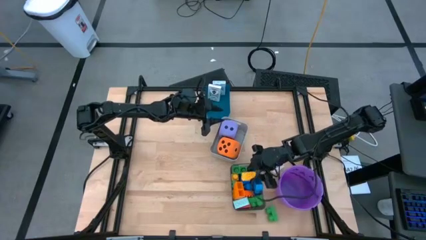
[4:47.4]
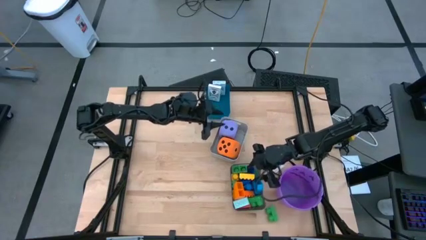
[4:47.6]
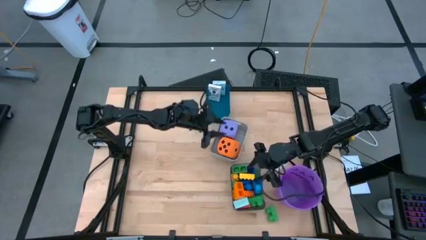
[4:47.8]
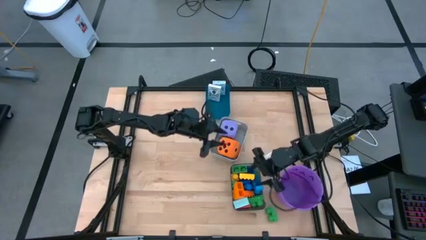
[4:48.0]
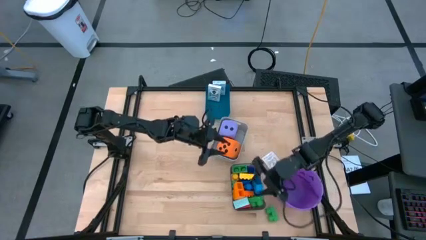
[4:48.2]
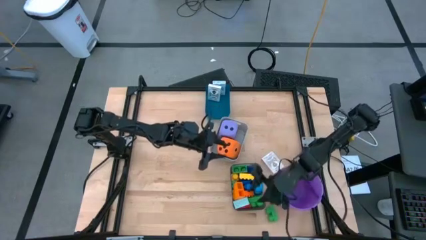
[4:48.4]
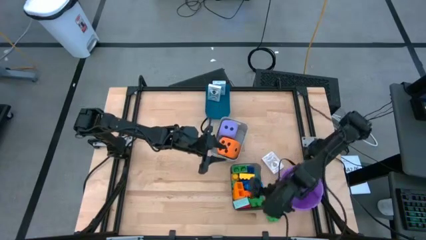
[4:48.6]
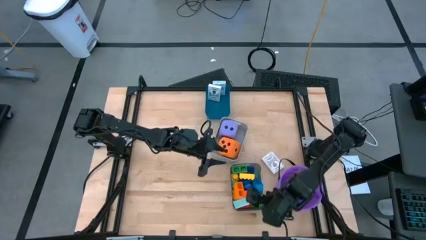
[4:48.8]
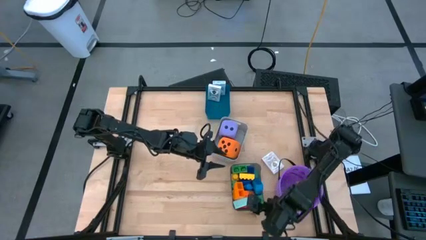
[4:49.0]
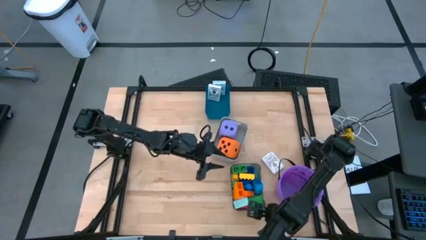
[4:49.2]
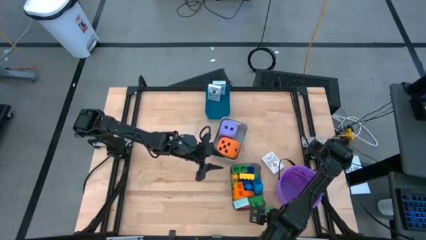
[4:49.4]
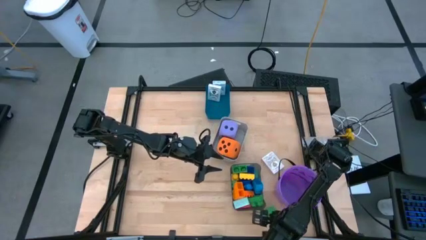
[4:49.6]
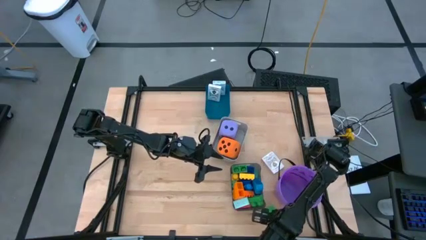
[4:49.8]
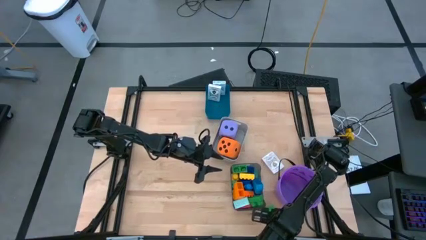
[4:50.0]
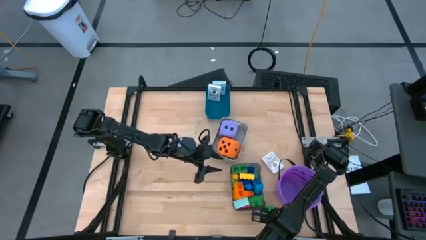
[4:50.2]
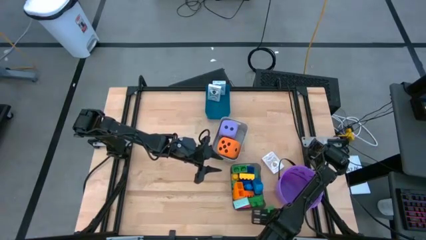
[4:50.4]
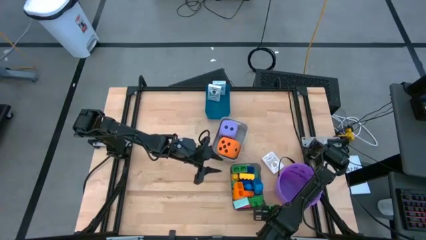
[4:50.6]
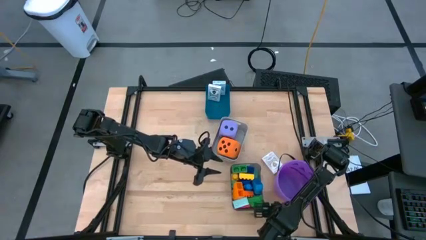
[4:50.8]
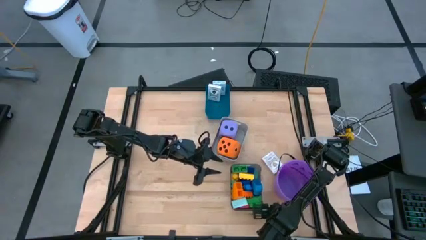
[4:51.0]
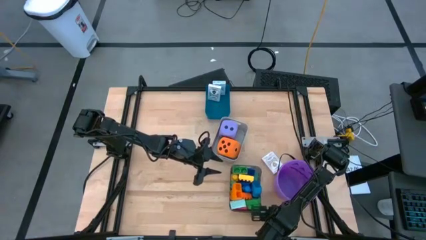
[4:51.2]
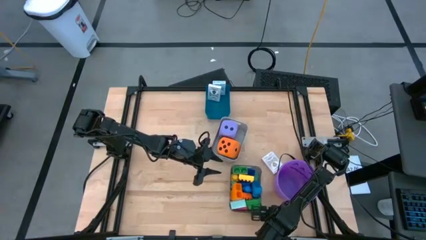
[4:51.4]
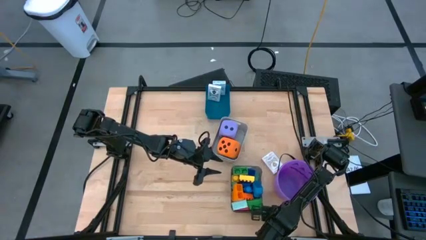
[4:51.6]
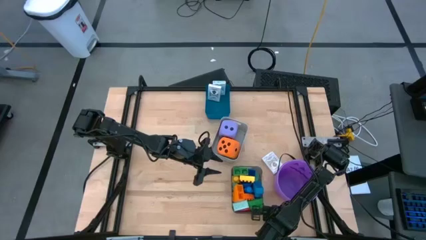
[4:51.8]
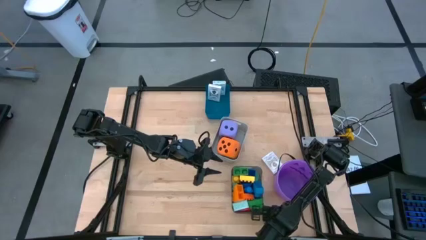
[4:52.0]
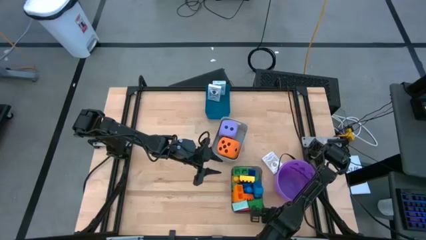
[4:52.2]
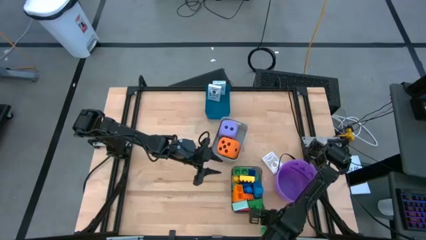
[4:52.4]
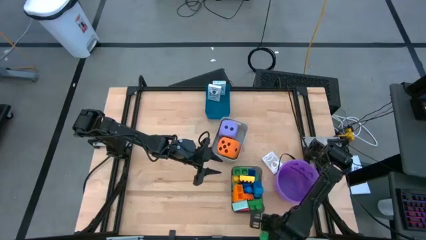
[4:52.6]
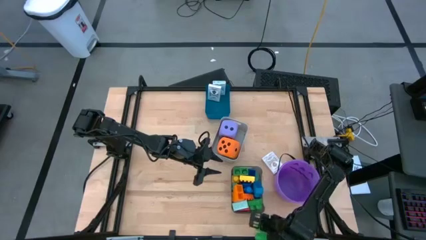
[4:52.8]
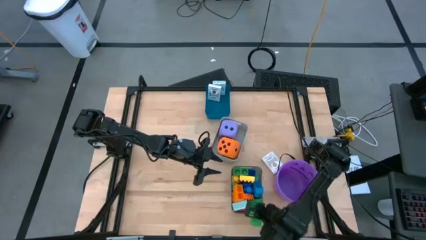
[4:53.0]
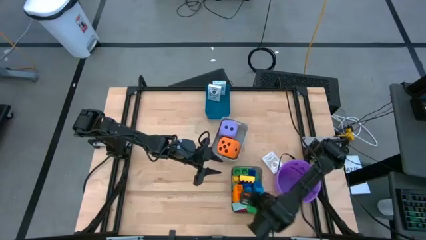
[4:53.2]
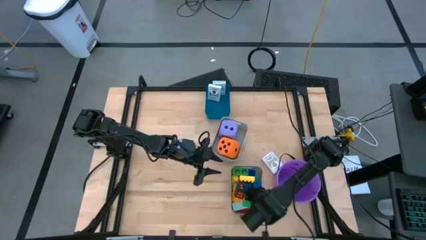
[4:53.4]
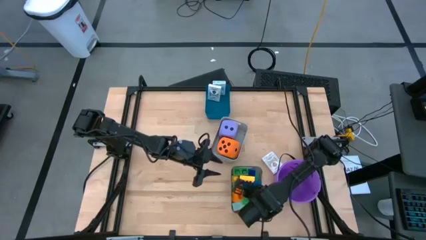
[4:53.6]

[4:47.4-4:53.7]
Task: Pick & Place Toys
Put the green game piece into the black bin

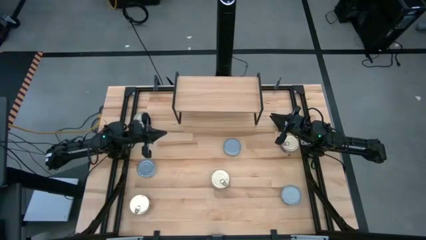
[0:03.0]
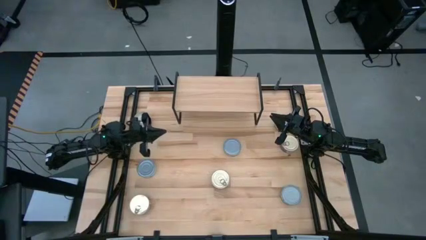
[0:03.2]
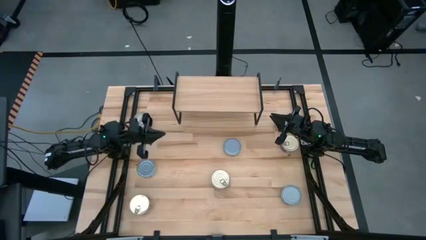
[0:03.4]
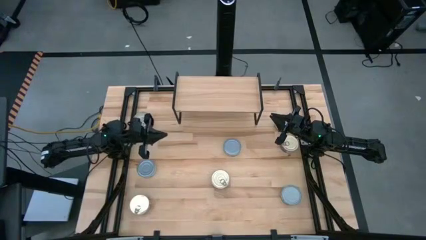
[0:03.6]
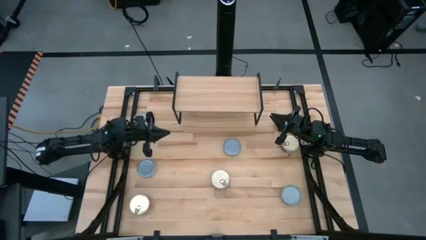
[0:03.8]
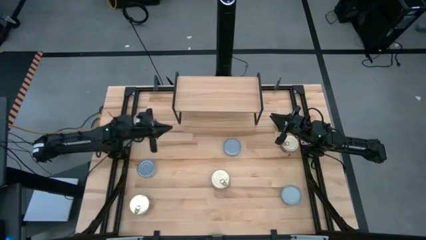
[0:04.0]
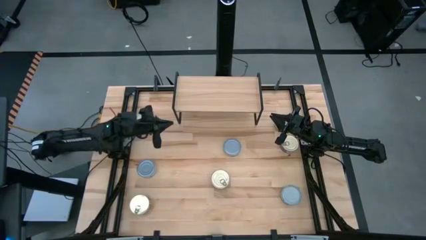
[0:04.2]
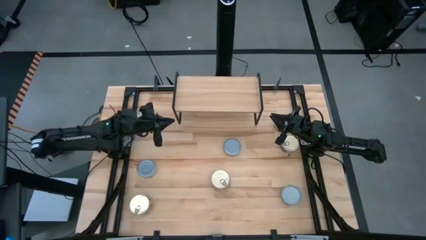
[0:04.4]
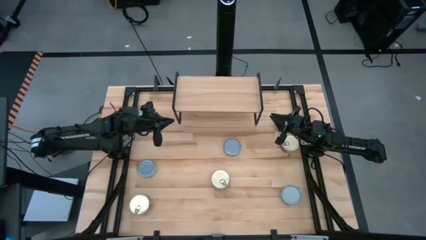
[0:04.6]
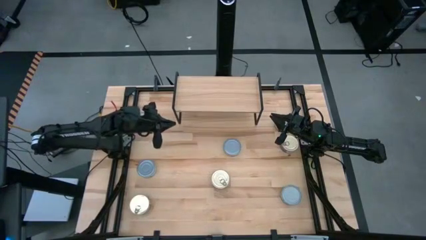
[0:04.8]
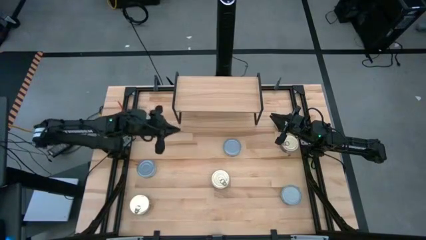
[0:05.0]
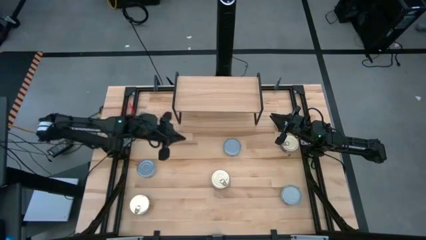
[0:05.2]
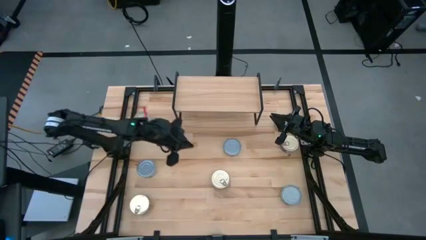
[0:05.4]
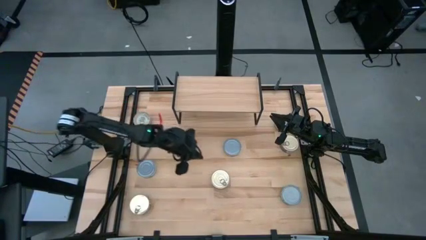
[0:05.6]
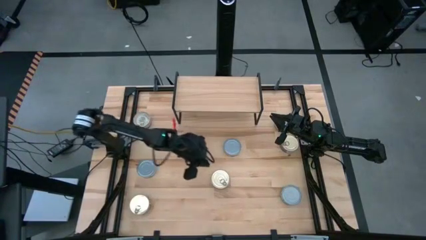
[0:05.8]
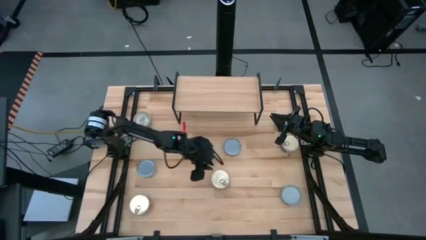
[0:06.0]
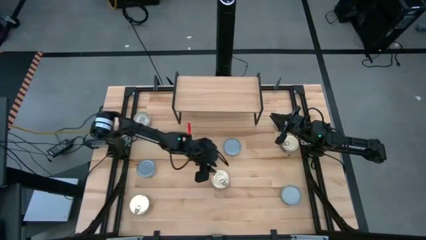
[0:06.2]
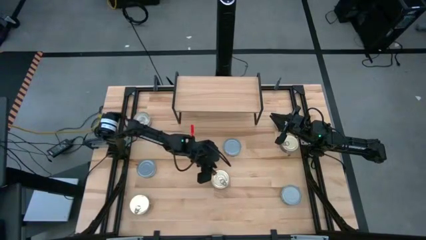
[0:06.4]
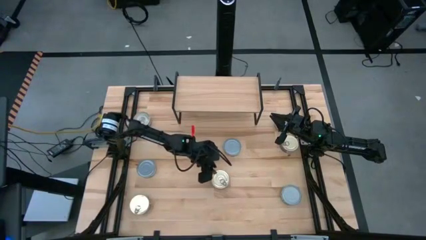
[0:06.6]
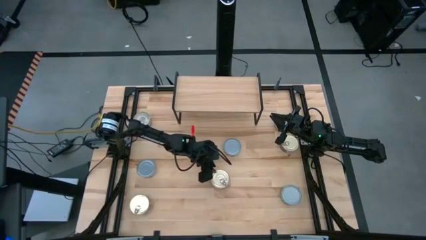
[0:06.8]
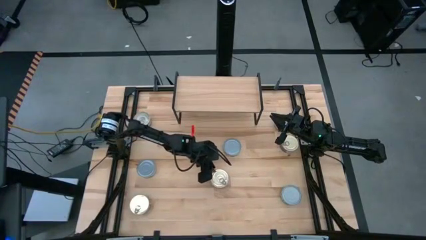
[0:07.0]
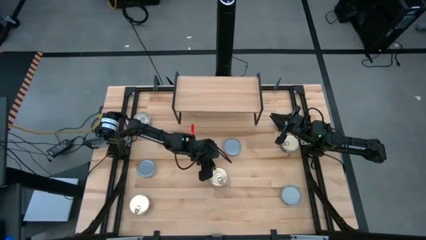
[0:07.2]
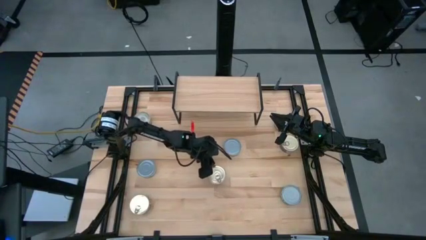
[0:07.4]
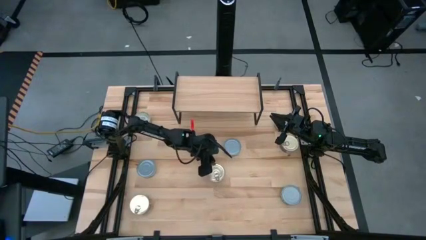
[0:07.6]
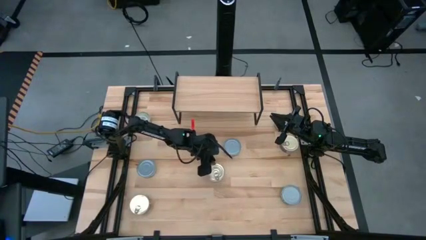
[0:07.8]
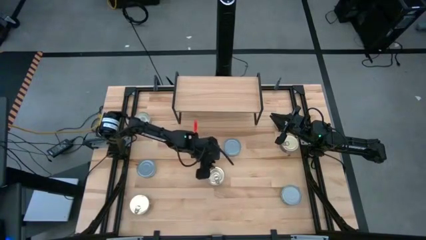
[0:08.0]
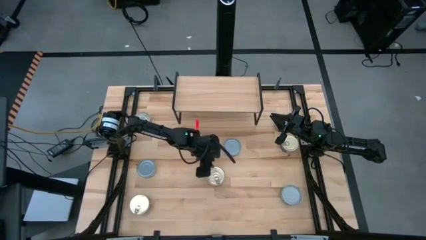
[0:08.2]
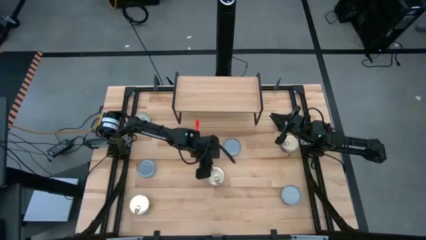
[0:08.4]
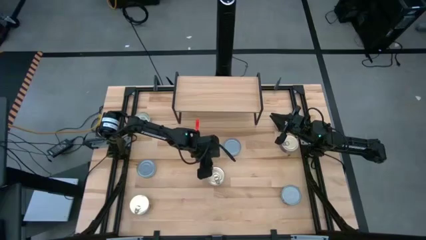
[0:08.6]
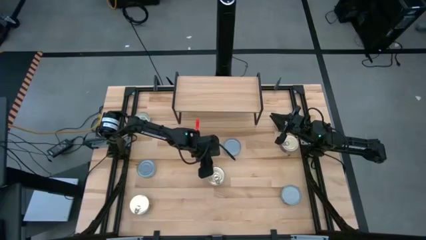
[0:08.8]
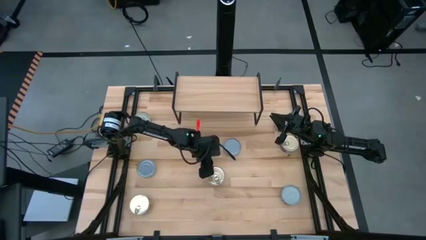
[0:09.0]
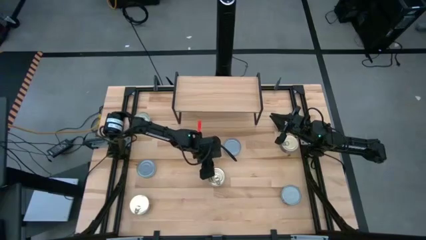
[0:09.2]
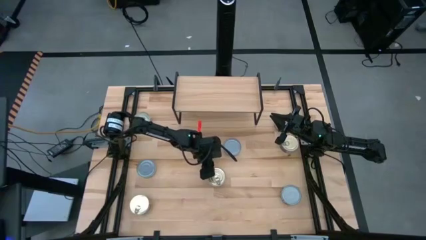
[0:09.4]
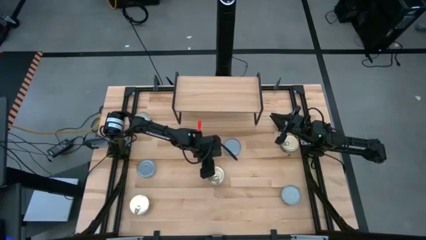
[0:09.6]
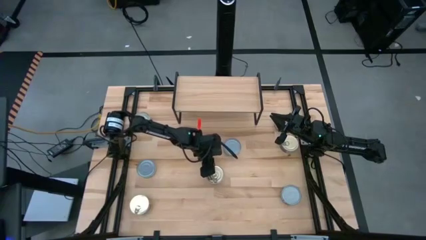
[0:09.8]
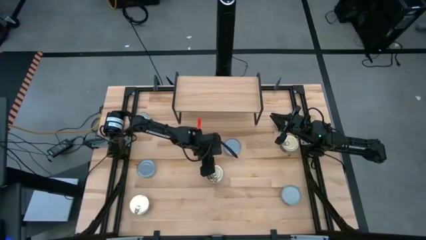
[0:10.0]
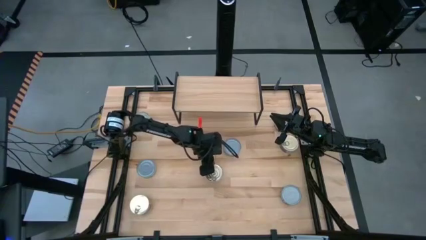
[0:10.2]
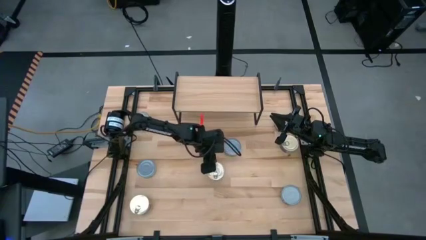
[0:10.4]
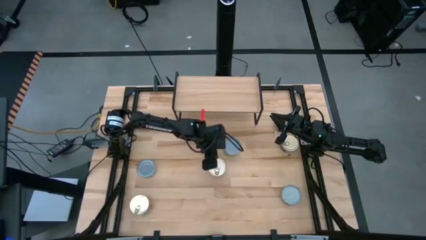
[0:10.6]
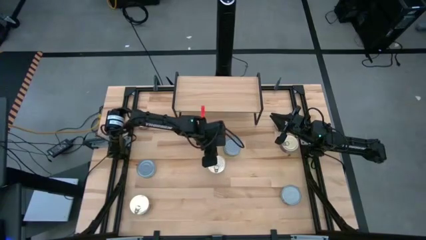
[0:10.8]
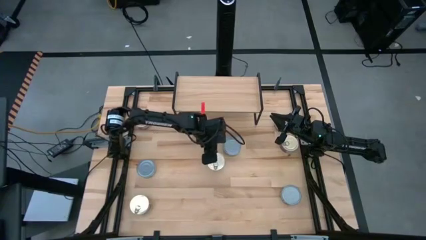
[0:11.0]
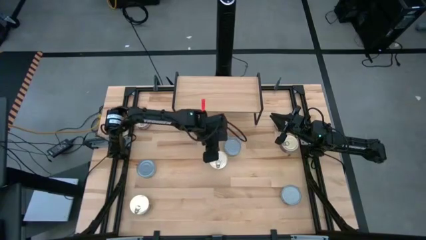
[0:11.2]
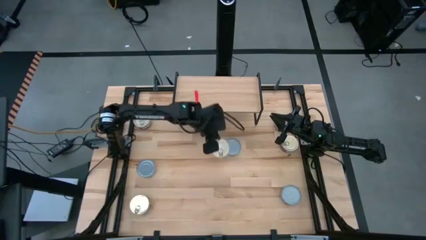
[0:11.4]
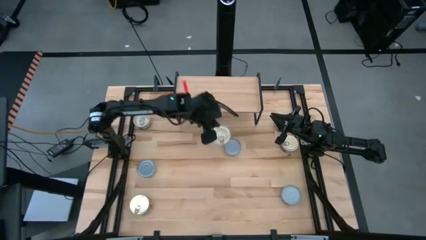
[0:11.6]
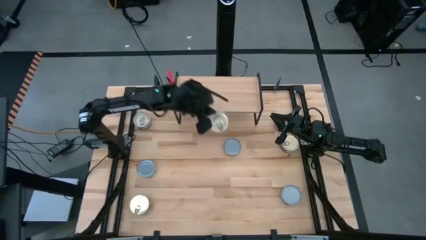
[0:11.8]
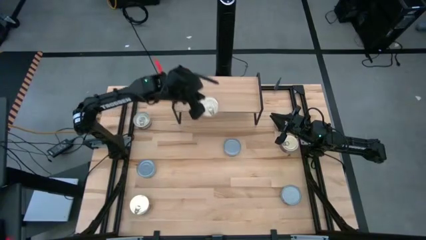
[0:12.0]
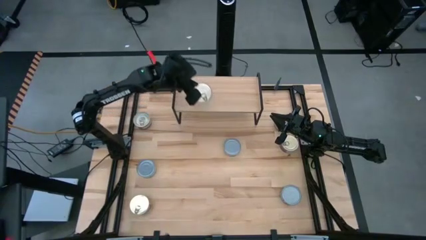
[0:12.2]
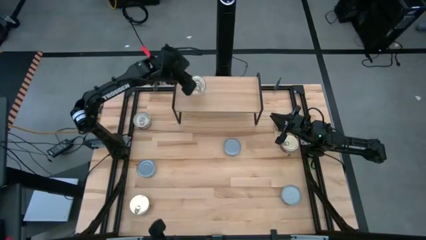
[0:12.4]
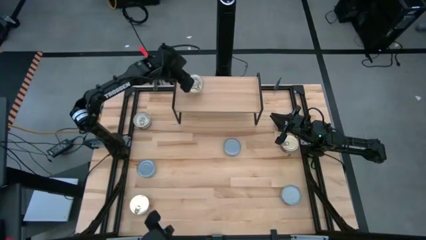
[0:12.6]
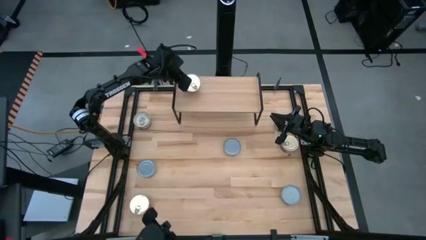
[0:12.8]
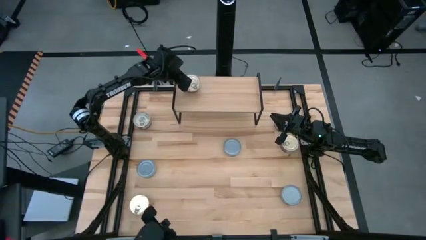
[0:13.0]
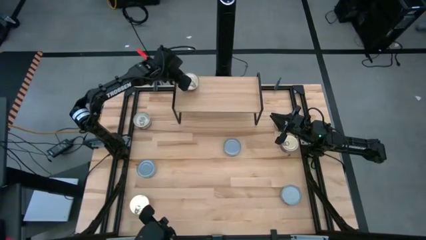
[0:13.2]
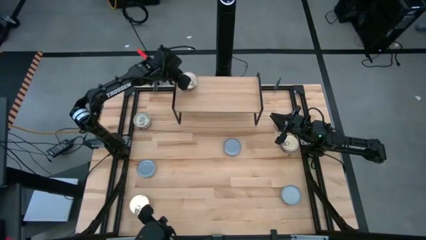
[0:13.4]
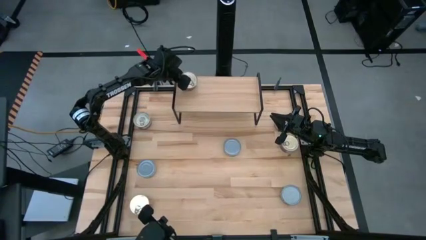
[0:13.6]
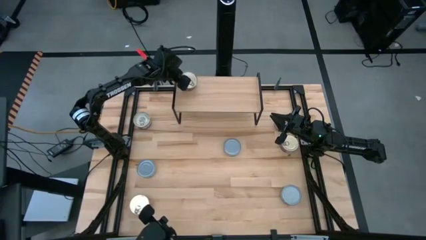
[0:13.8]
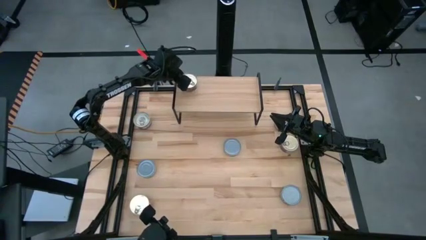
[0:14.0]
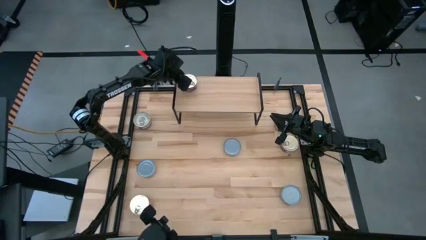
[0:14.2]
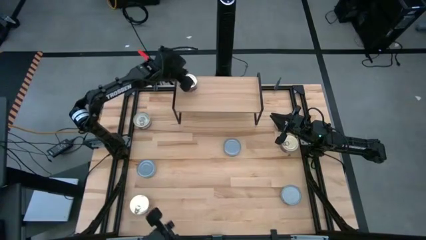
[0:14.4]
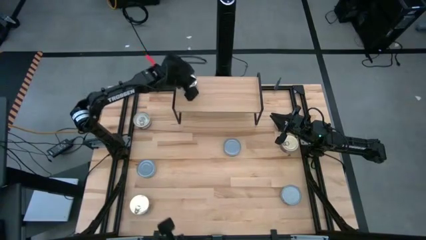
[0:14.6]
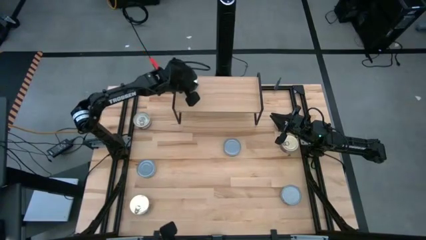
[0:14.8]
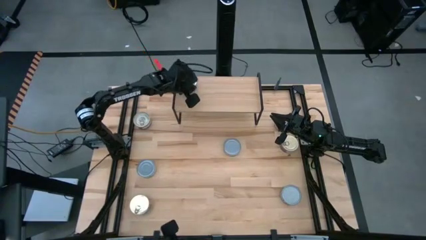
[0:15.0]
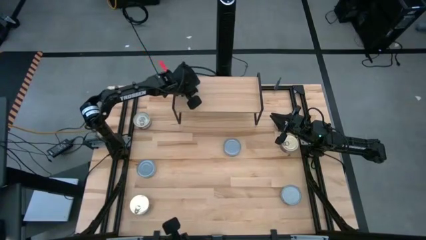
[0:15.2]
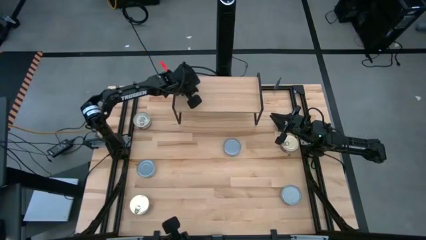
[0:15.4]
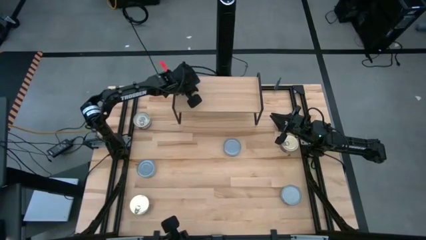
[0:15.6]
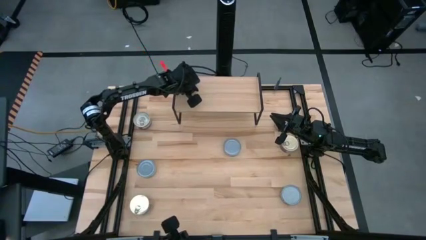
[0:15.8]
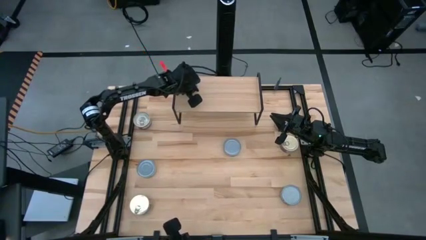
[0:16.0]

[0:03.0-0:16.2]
Task: Stack canned seafood by type on shelf
Put the center blue tuna can on the shelf
